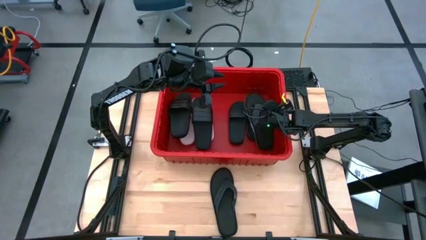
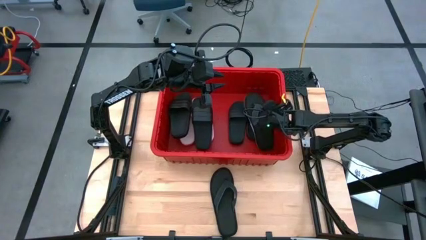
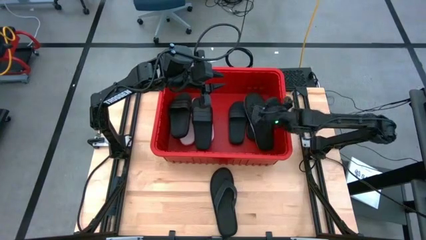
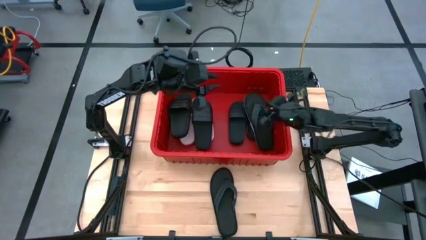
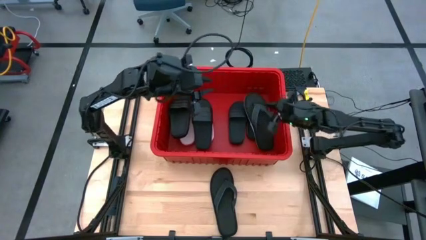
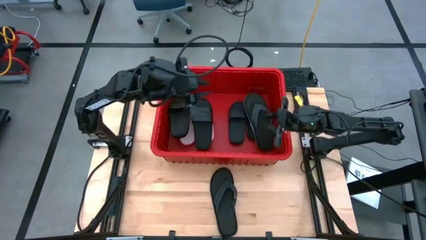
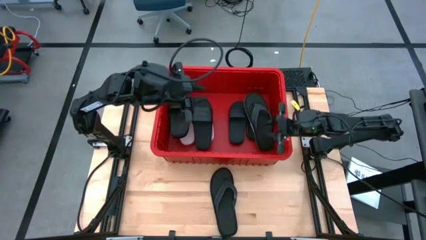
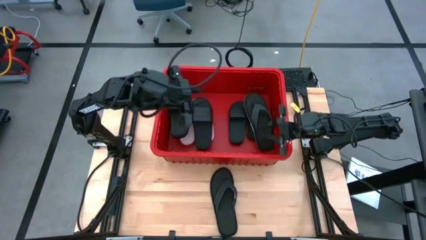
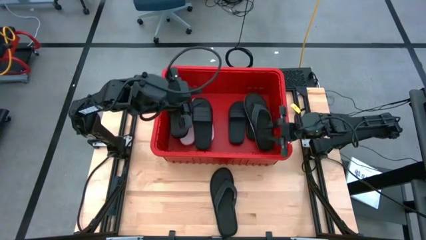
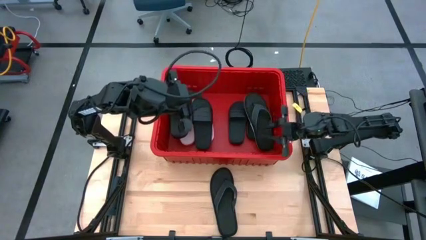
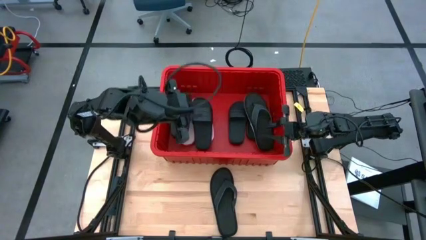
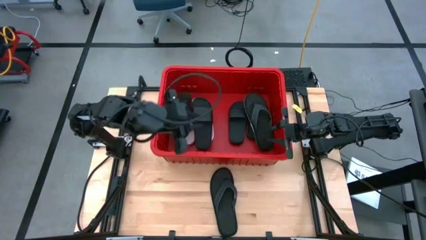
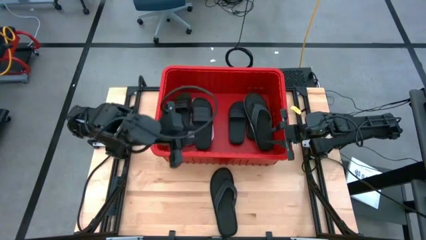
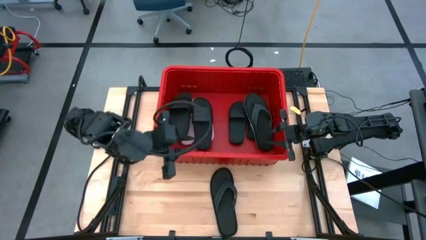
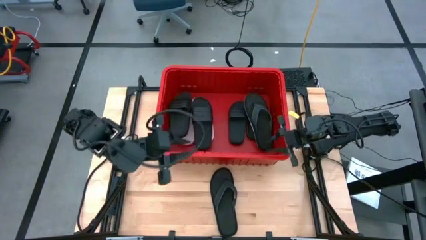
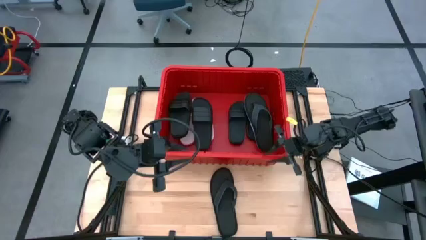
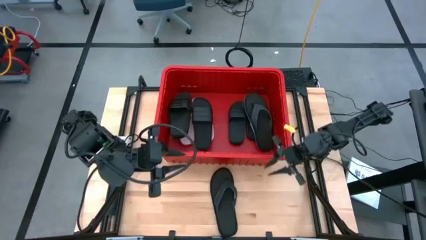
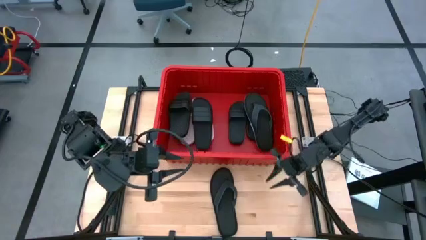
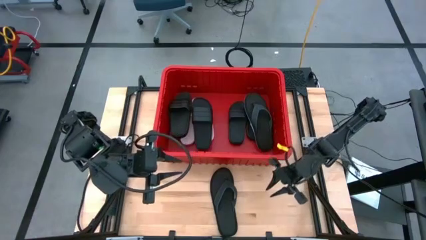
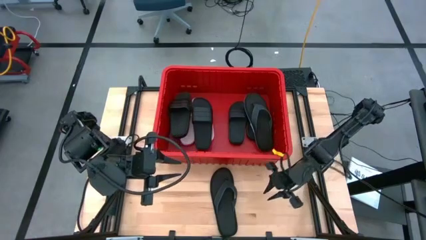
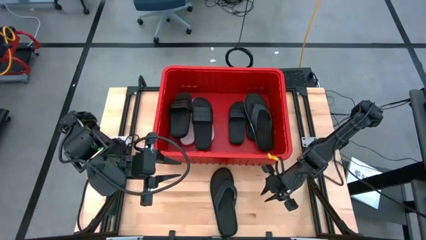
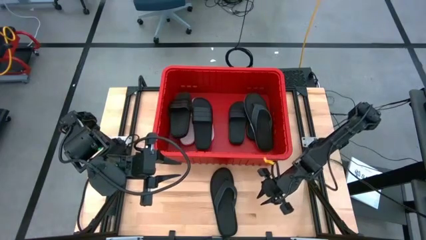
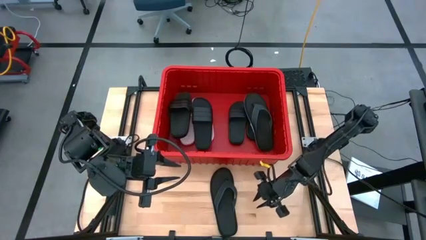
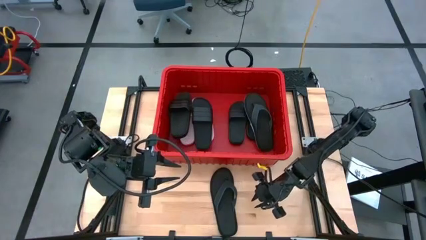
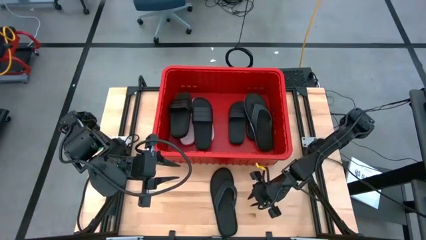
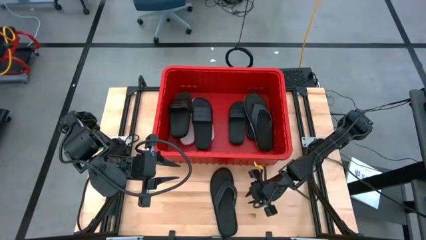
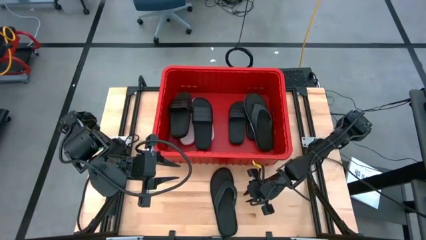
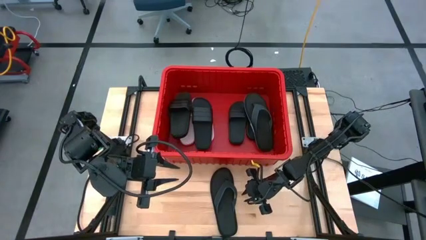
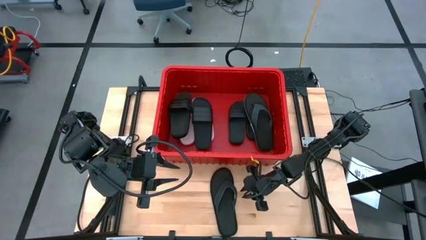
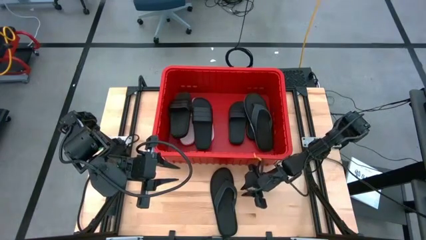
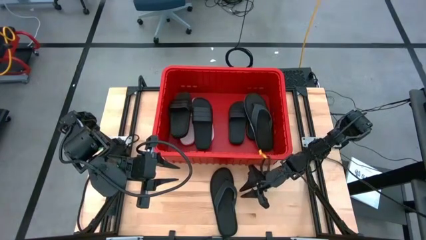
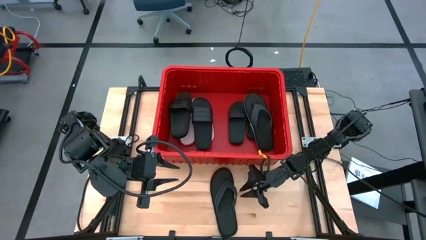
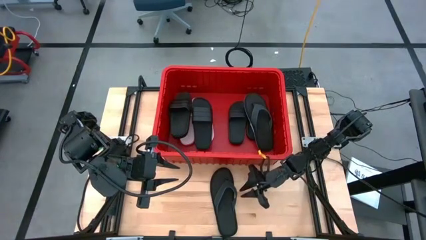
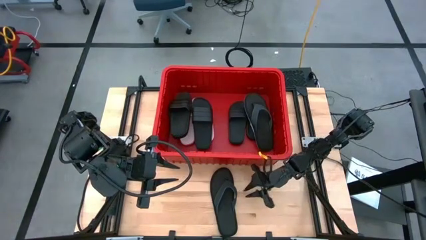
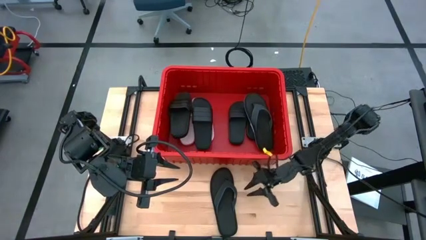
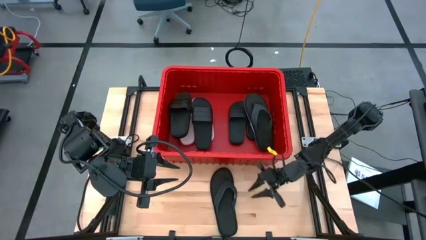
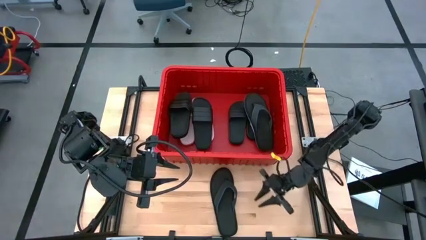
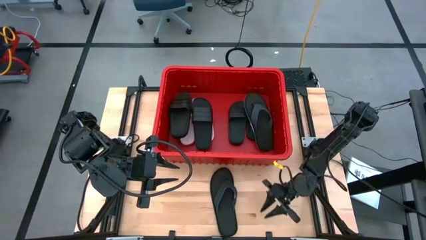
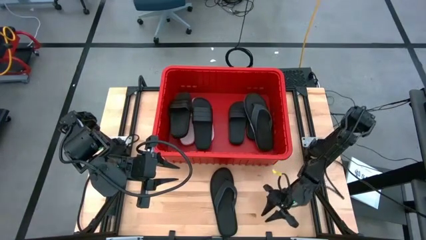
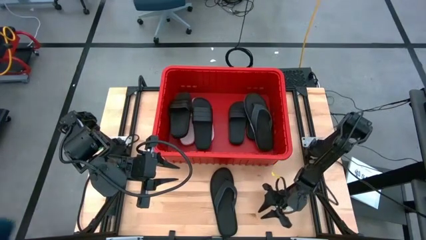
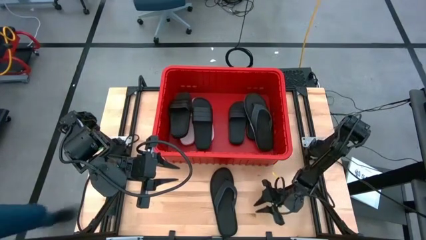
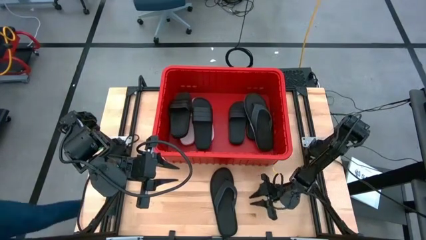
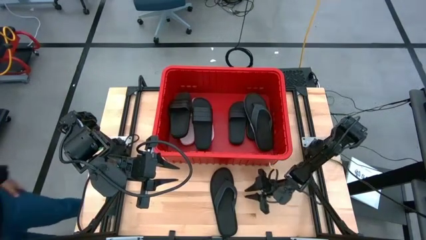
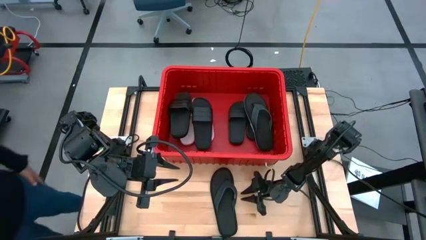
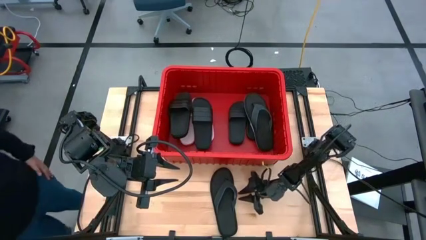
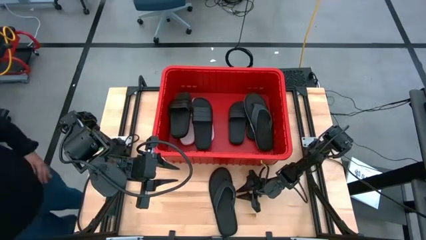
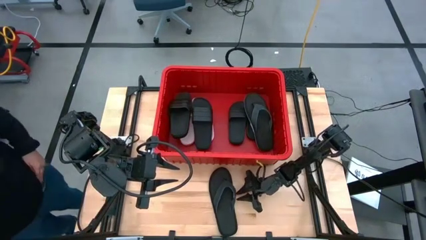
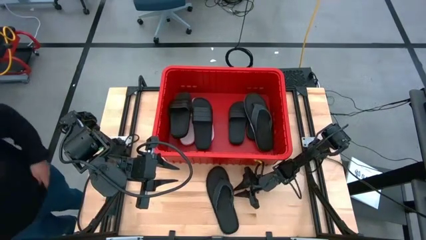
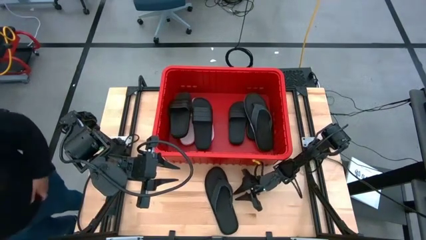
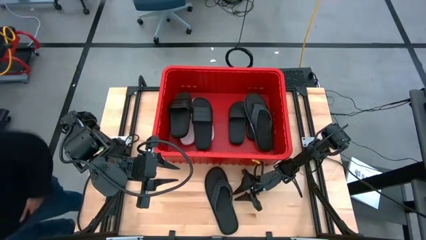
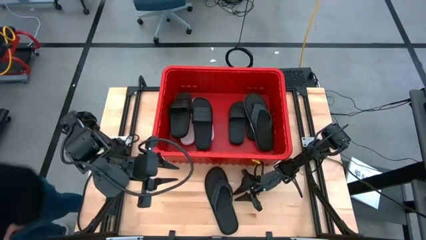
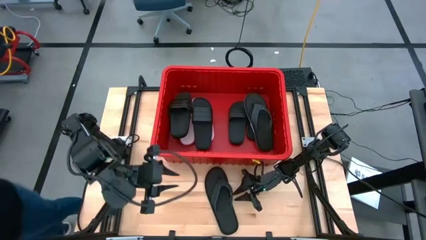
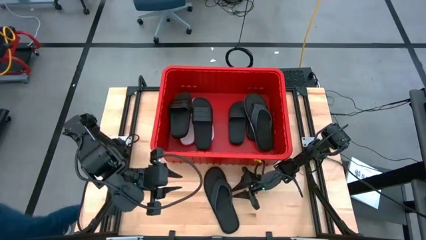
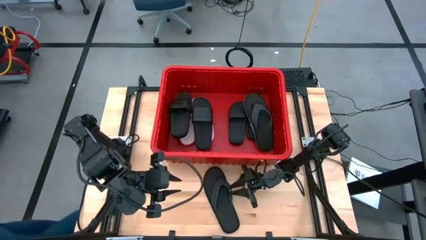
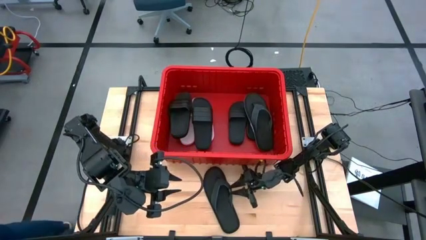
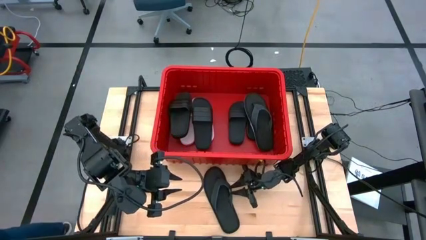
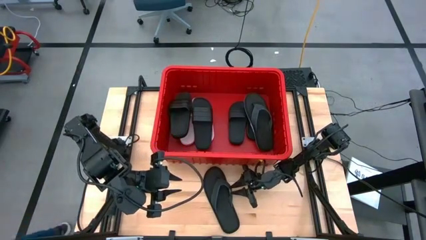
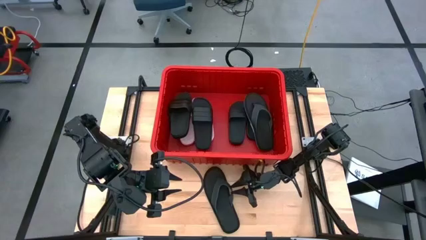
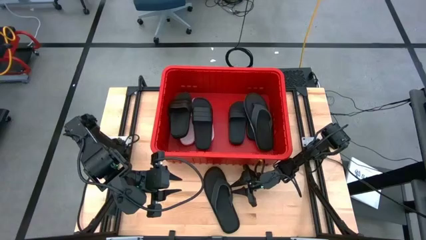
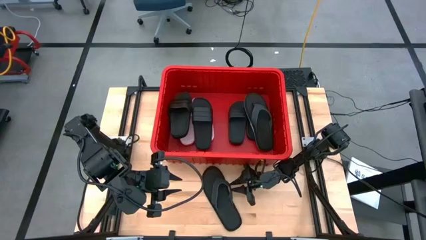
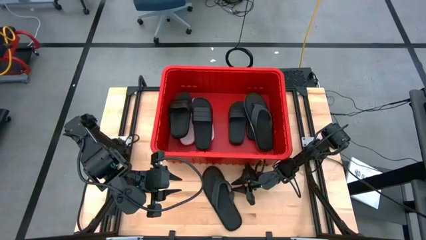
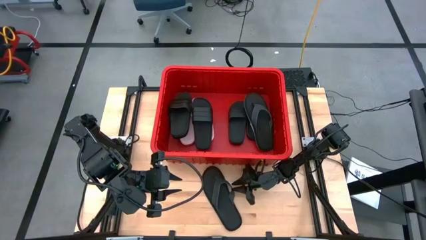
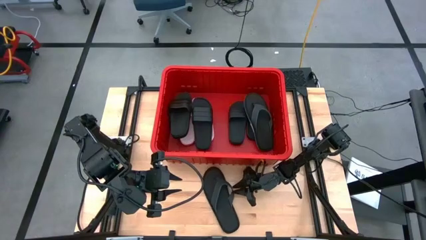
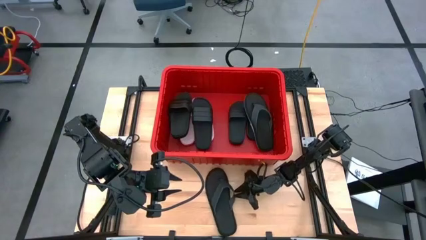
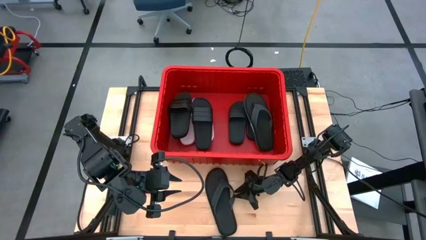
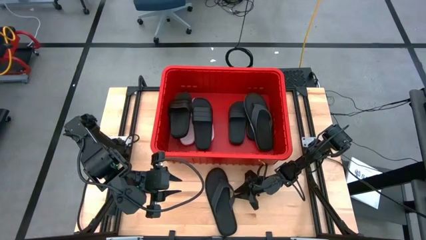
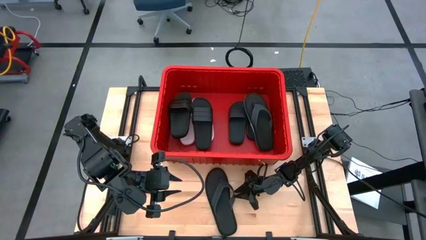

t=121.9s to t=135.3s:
Task: Pick and place slides into bin
Put the slipper into the bin

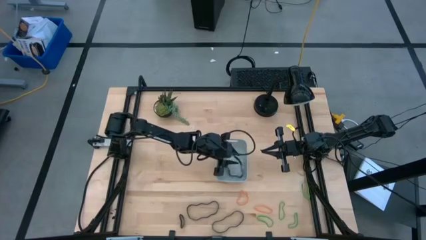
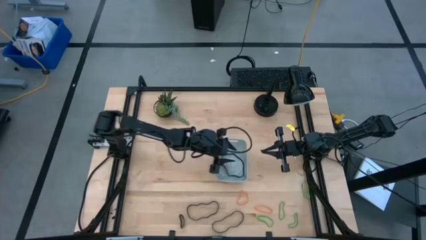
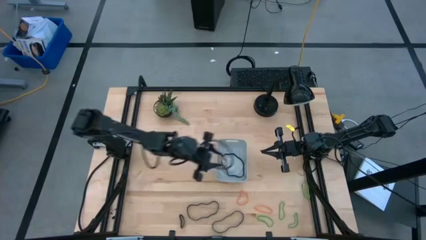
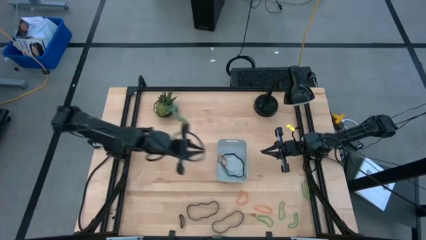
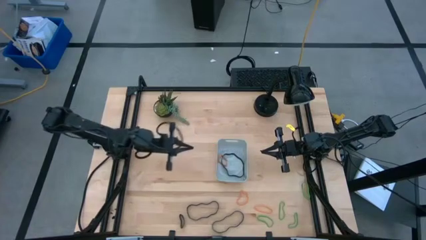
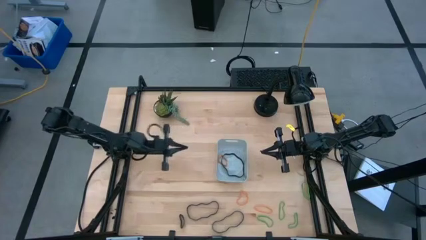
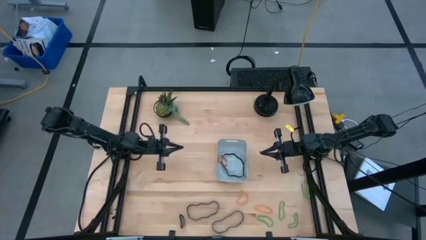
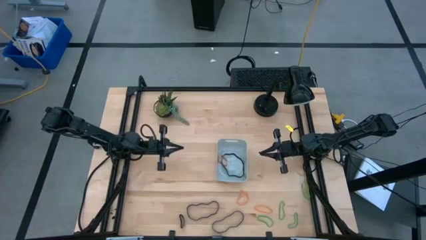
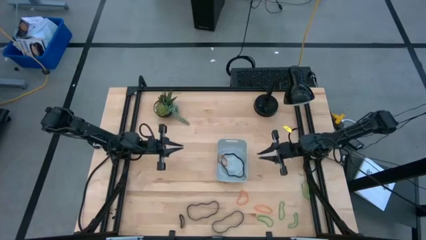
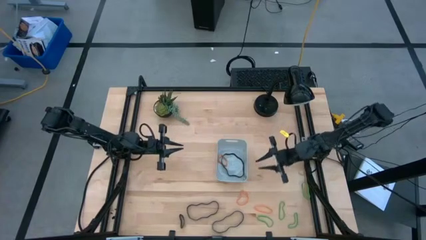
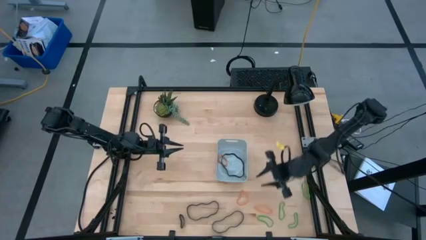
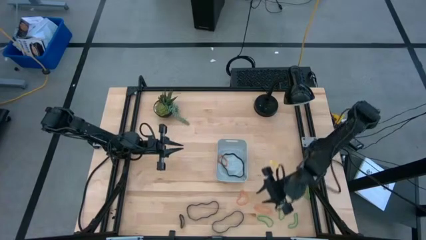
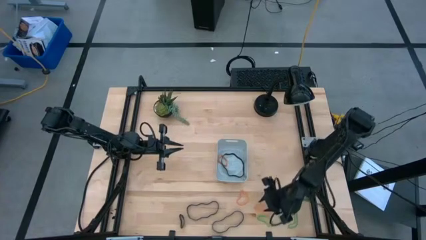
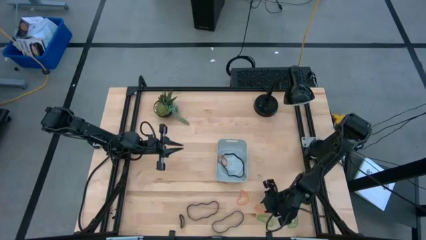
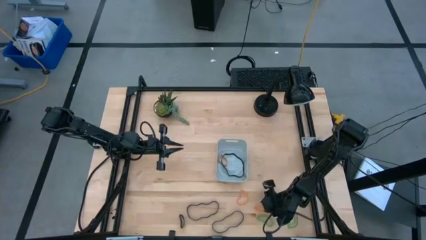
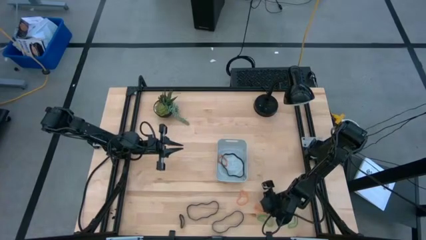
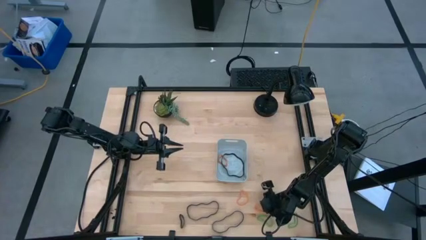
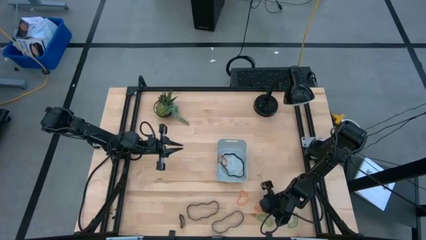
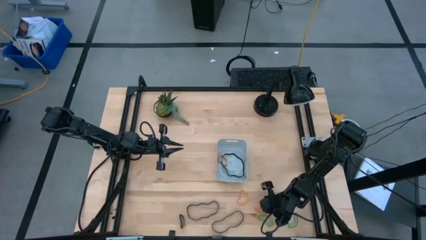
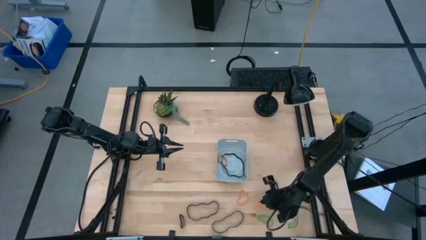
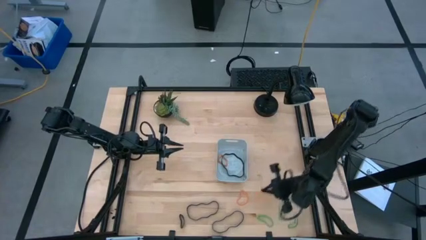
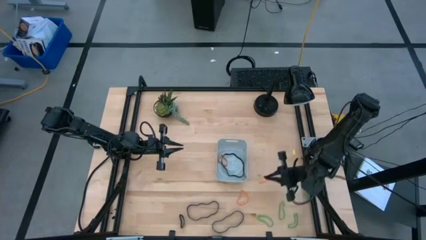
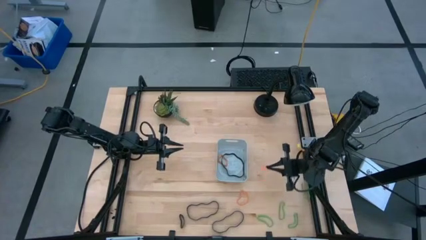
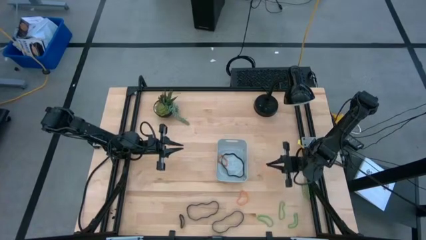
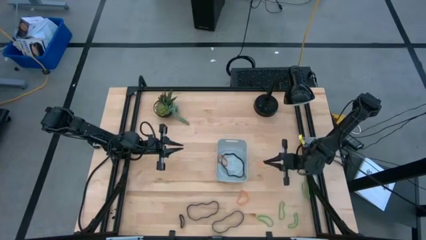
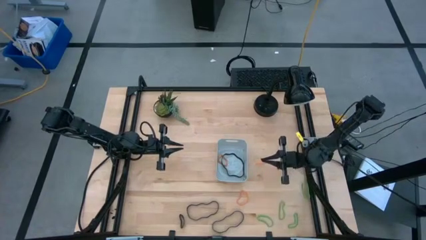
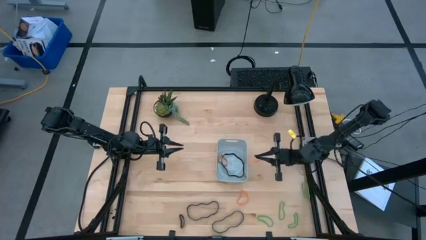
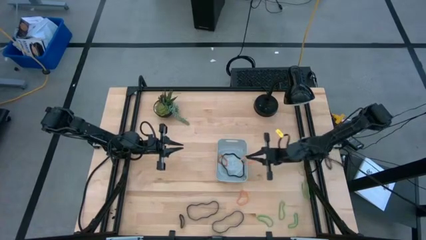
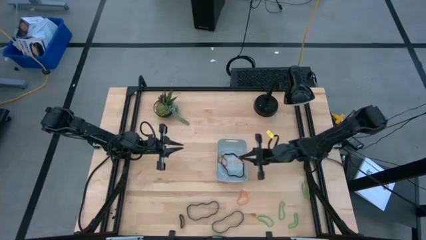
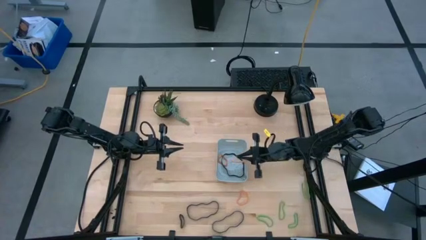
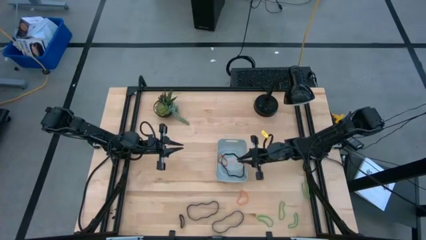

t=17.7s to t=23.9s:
Task: Pick and place rubber bands into bin
Put the orange rubber band into the white bin
